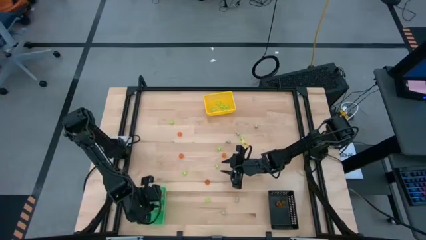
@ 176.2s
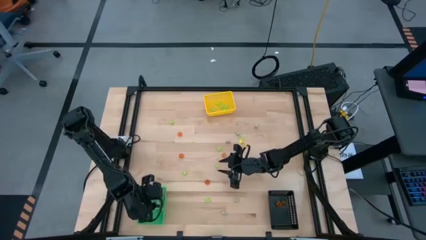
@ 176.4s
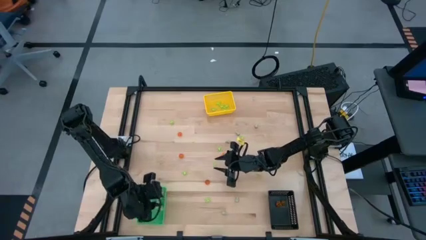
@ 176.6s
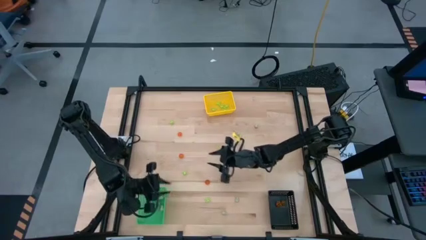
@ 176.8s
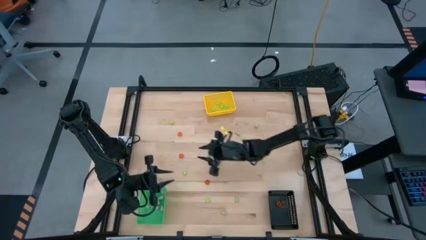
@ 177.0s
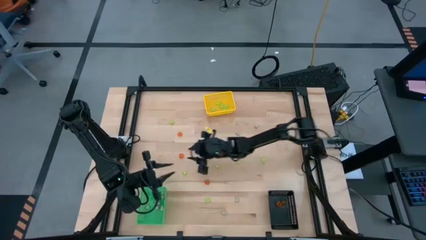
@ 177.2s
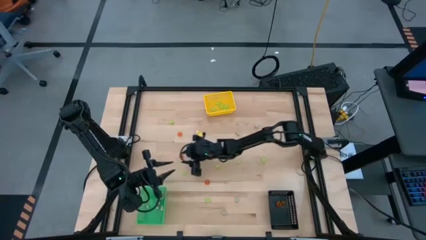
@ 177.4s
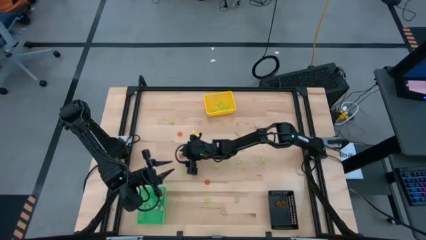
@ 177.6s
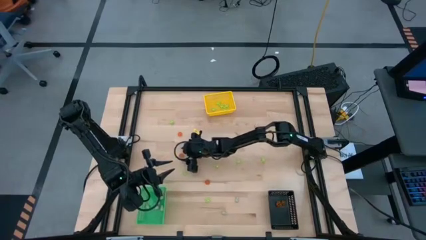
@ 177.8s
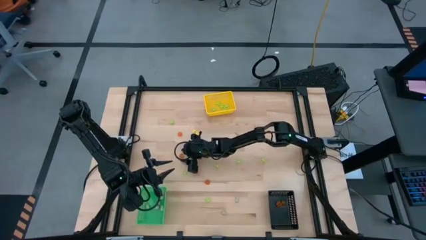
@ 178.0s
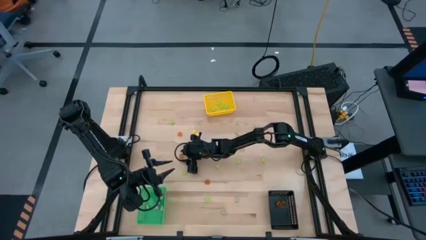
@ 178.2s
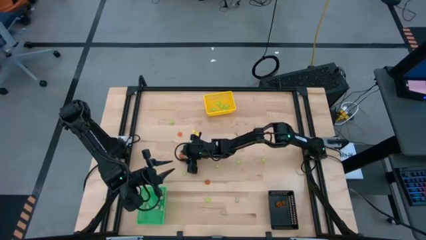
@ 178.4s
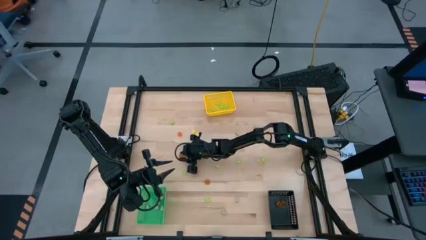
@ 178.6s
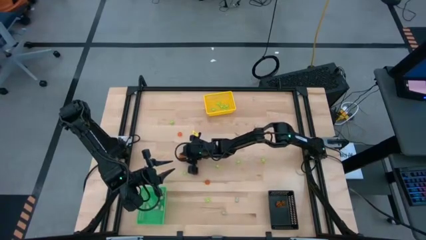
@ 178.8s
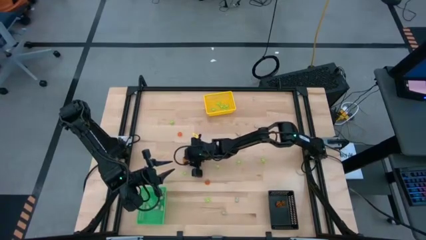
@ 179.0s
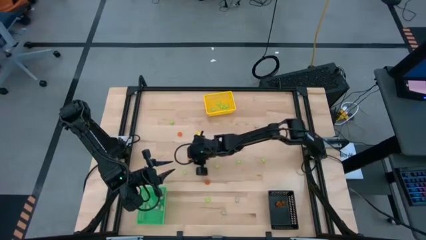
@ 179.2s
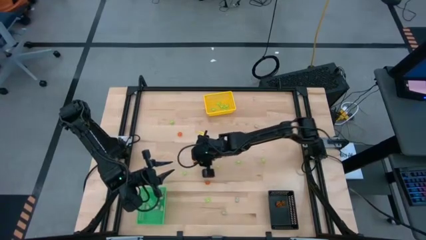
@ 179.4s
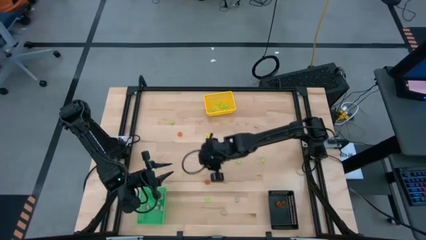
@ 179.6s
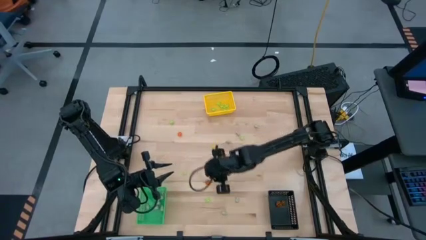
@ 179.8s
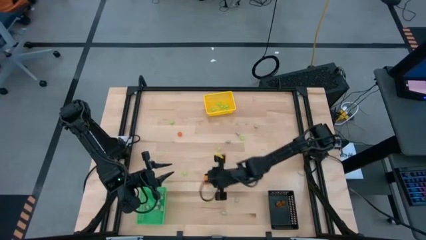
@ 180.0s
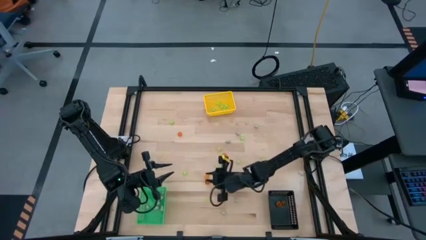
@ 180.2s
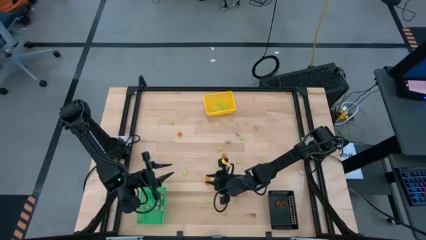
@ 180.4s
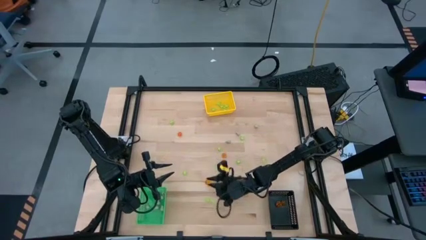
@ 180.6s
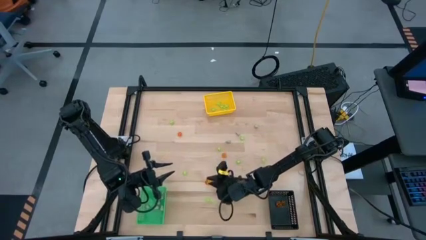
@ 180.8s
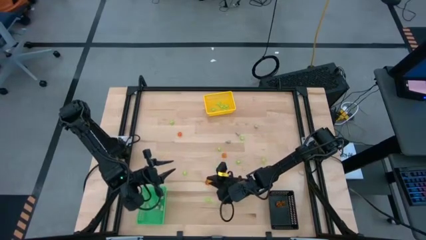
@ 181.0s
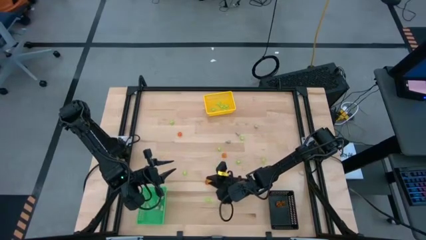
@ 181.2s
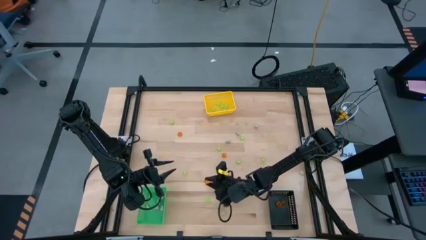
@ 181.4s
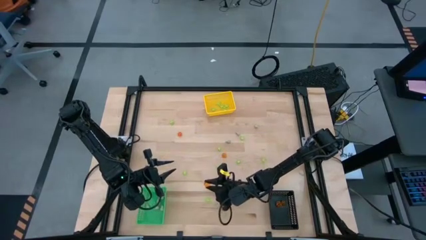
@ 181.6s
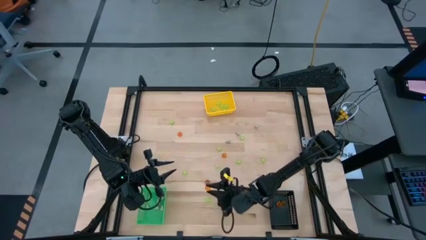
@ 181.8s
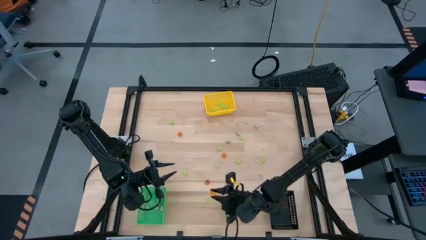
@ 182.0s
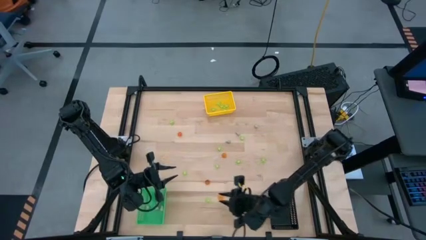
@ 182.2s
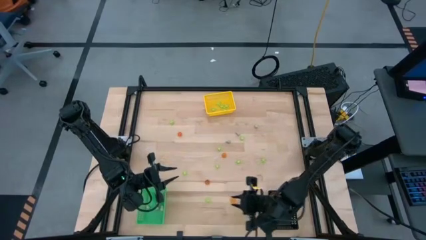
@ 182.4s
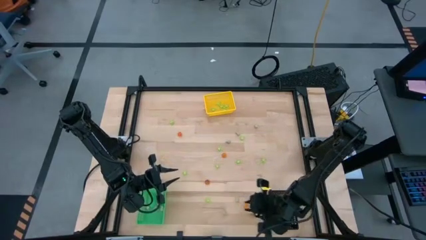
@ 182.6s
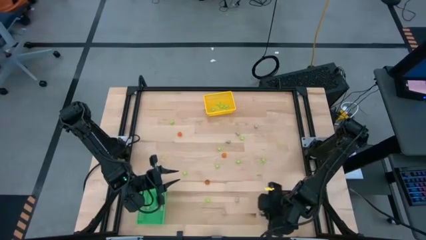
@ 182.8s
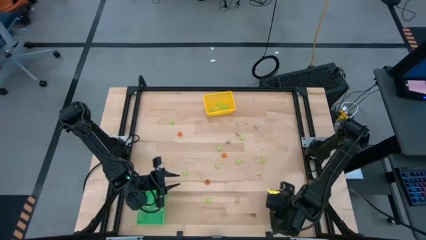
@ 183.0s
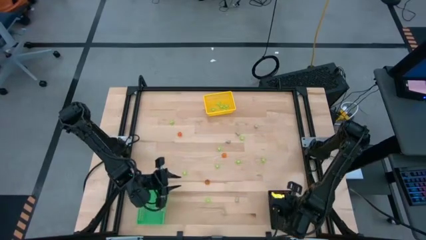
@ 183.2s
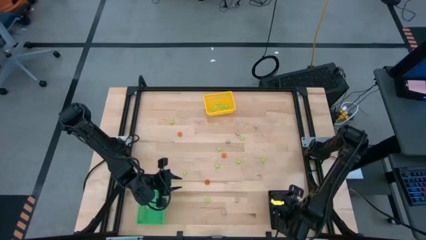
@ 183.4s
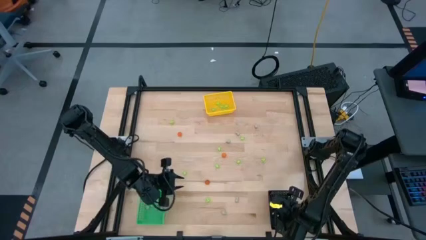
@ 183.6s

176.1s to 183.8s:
Task: Sort Halloween decoration
Put the orange pumpkin toy into the black bin

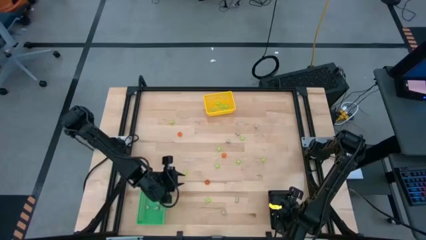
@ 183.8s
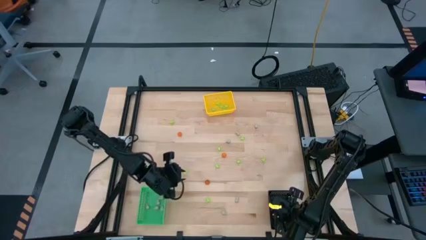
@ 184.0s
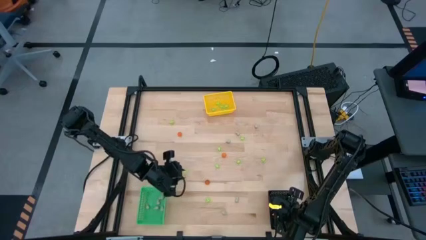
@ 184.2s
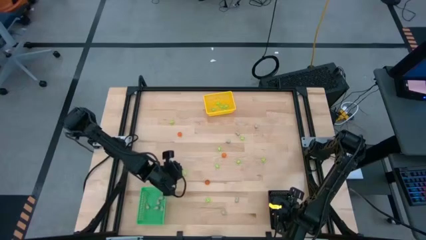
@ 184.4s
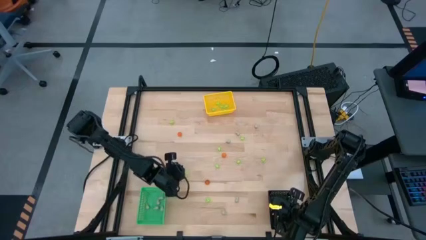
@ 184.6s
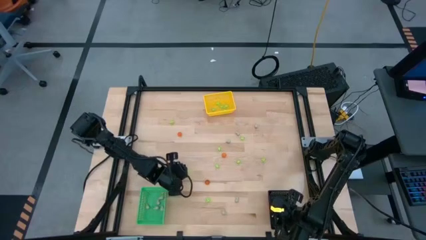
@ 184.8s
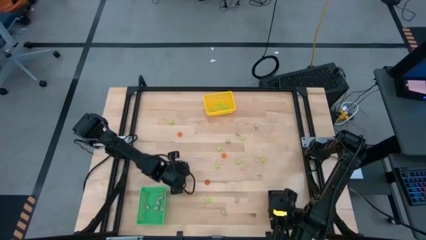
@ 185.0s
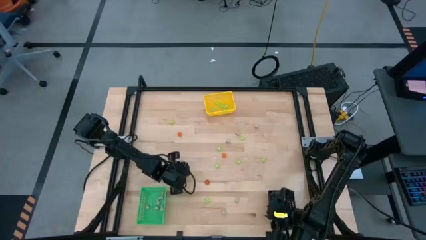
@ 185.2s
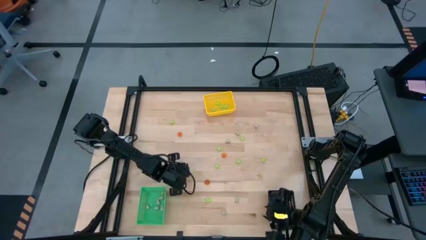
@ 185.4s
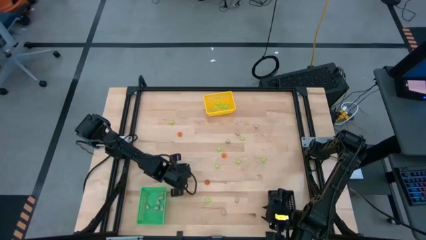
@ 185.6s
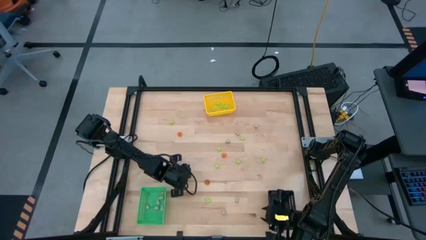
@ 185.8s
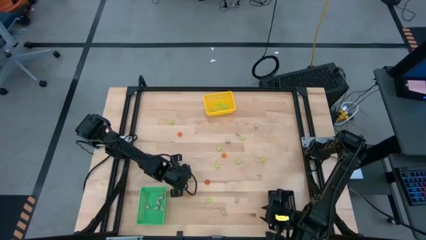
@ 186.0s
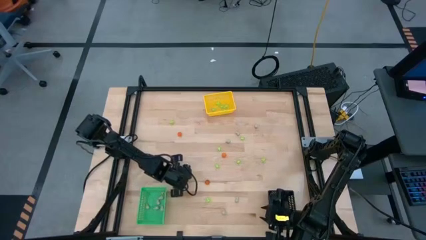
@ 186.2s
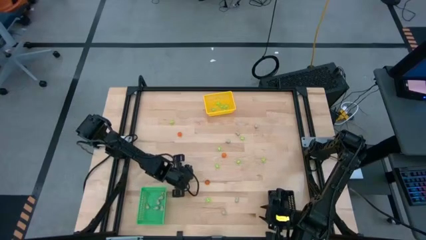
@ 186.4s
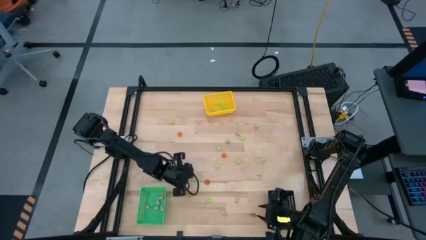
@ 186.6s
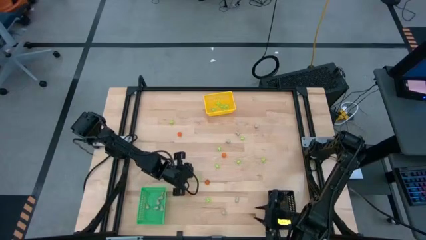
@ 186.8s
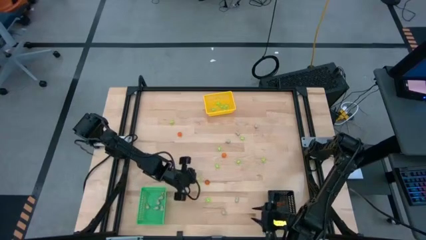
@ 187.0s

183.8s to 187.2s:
Put the green spider toy into the yellow bin

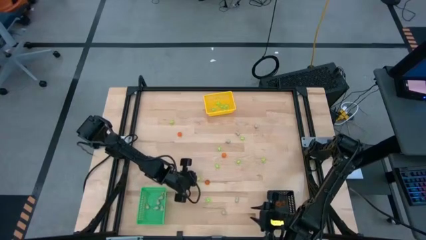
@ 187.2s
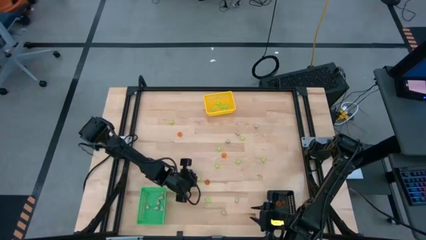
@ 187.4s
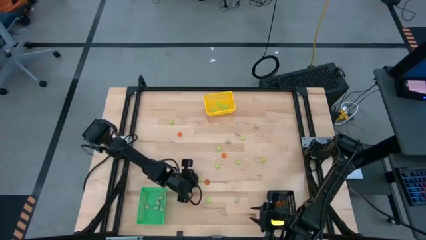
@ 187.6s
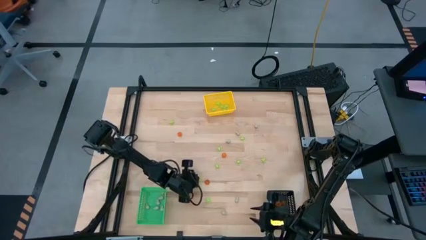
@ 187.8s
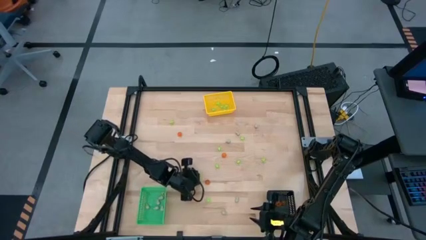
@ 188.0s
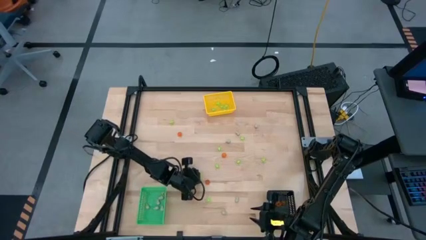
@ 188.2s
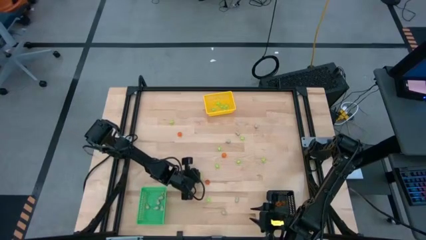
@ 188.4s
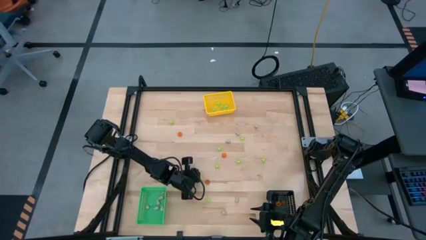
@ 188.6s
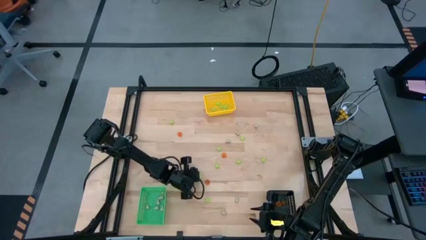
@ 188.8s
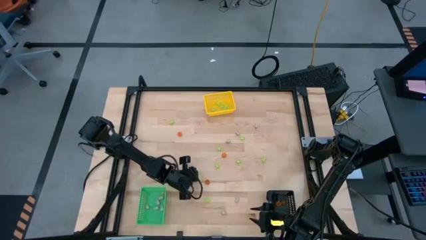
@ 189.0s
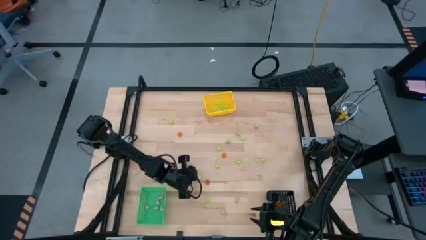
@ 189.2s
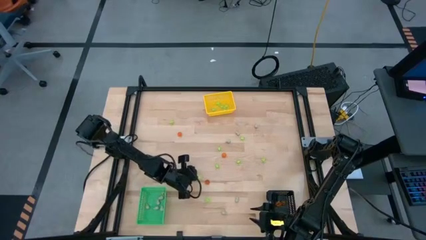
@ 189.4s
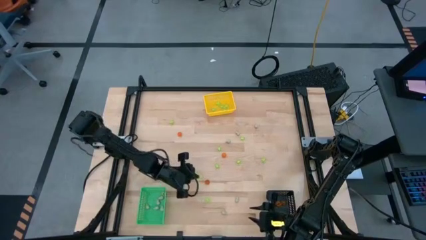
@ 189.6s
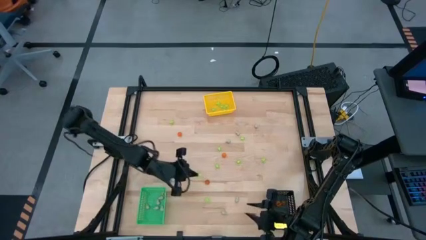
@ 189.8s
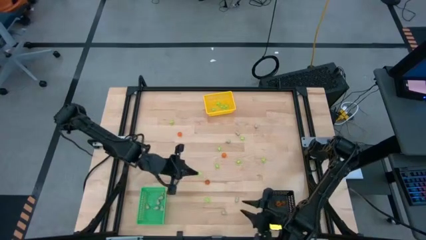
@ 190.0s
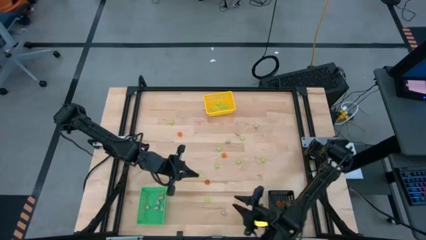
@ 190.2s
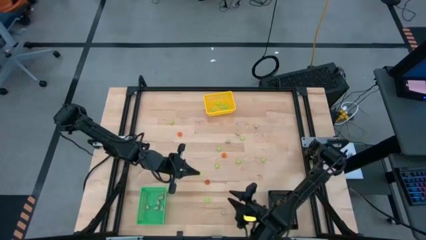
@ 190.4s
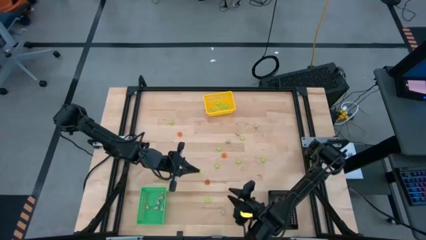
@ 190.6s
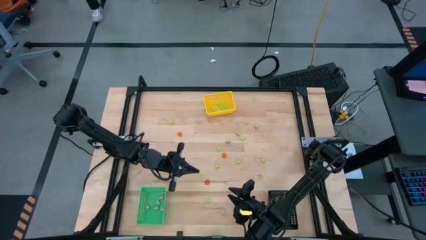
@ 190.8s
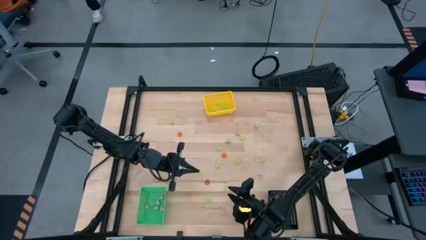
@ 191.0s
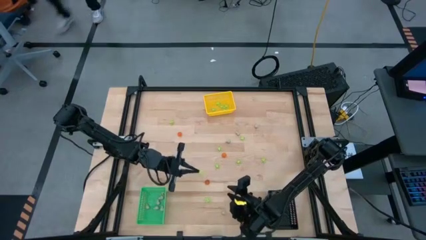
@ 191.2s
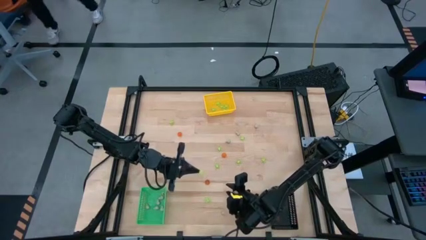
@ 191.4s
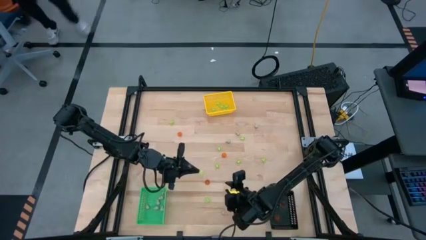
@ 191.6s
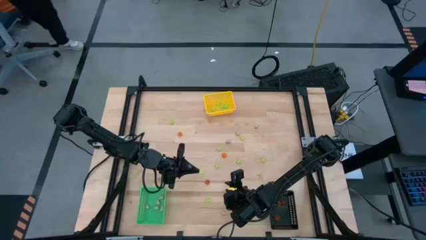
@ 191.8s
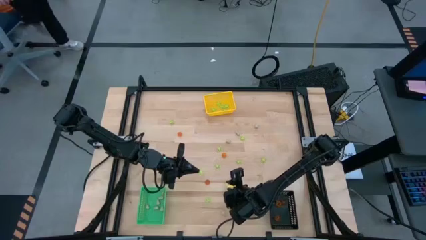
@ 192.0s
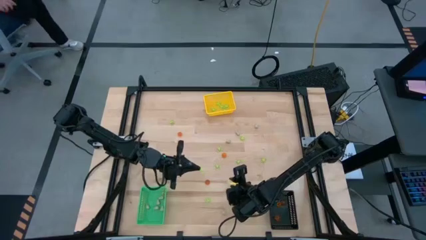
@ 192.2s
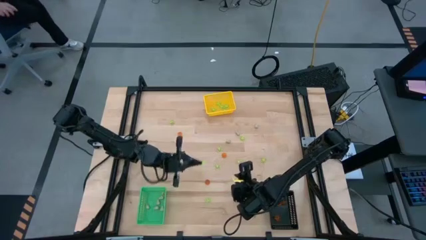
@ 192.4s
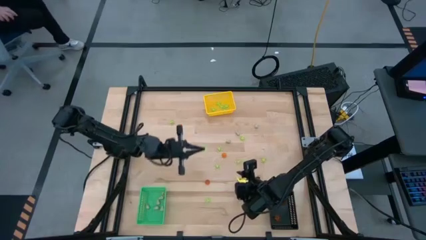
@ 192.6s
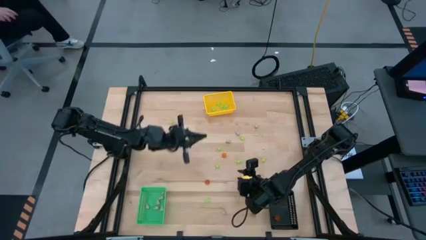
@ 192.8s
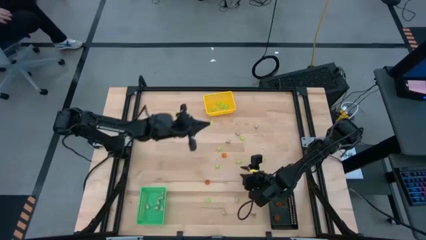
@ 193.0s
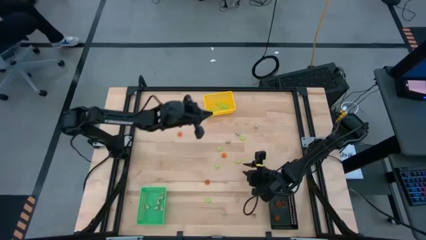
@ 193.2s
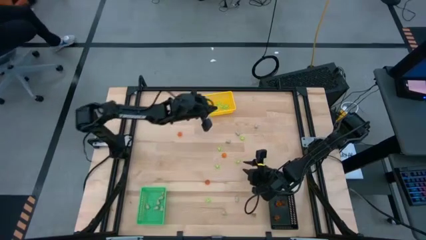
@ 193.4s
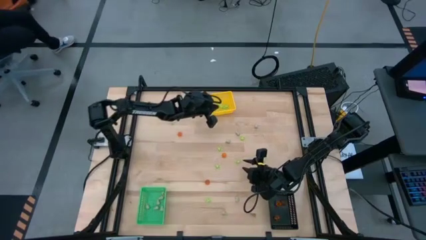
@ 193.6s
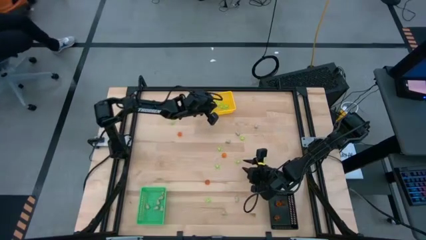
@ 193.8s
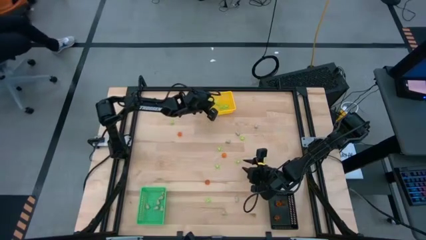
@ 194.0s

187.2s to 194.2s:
Put the green spider toy into the yellow bin
